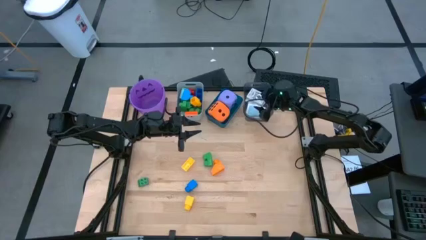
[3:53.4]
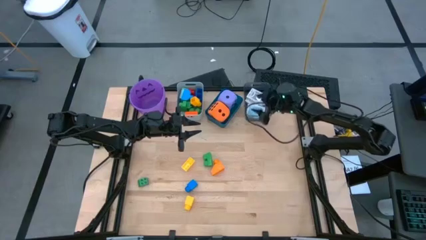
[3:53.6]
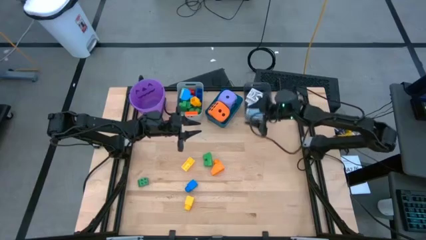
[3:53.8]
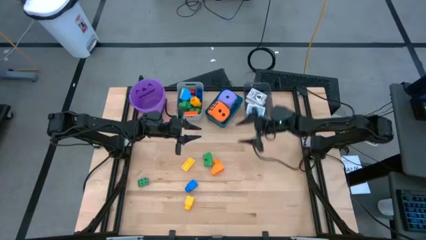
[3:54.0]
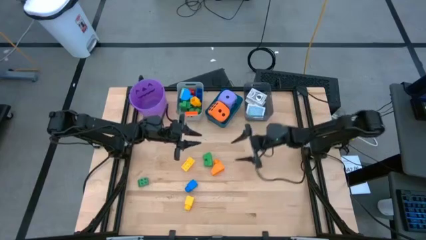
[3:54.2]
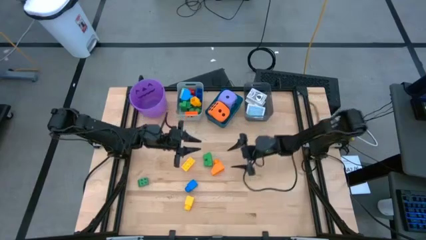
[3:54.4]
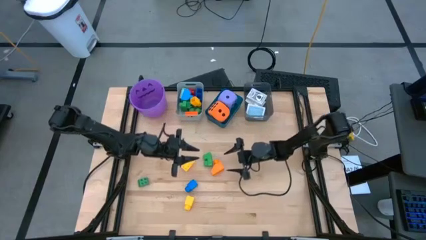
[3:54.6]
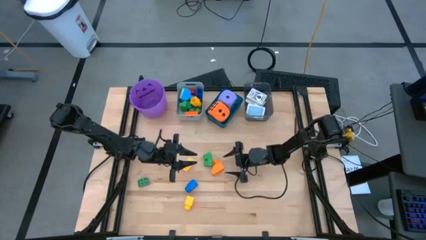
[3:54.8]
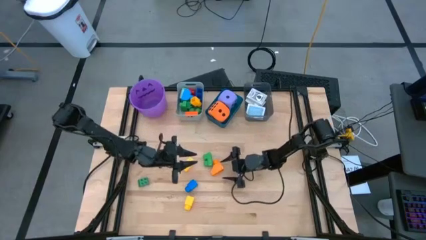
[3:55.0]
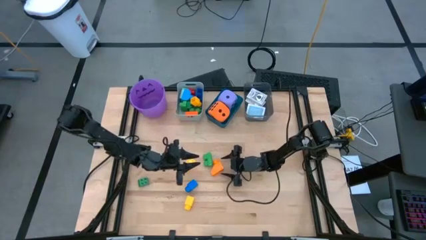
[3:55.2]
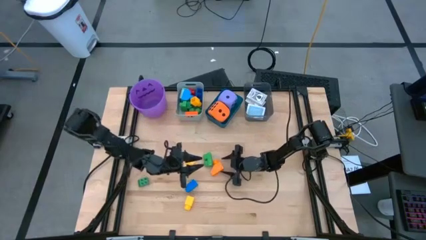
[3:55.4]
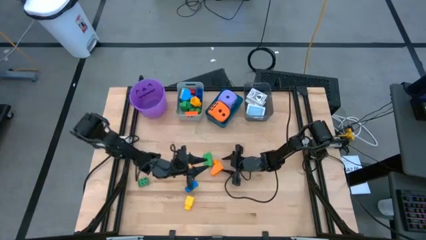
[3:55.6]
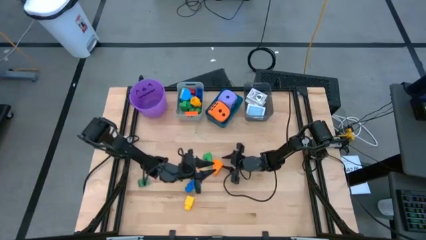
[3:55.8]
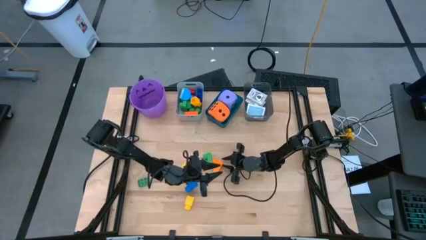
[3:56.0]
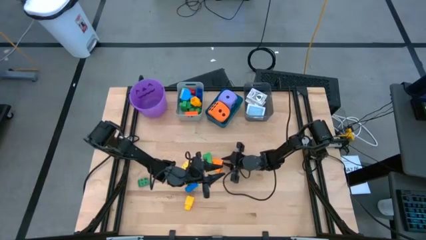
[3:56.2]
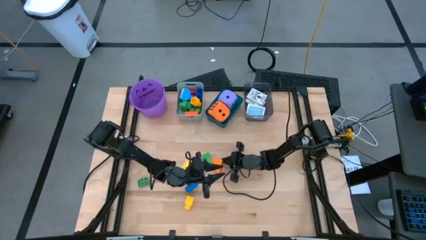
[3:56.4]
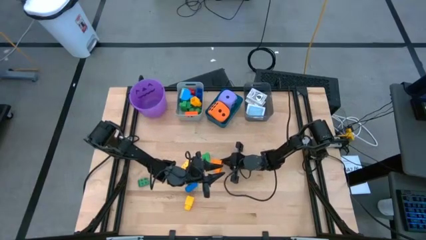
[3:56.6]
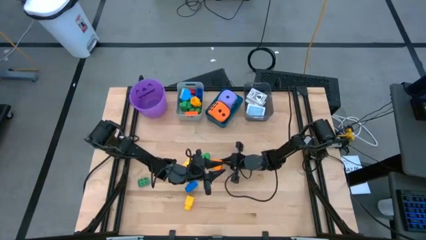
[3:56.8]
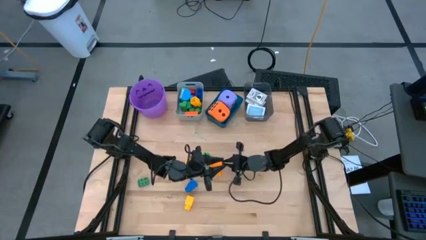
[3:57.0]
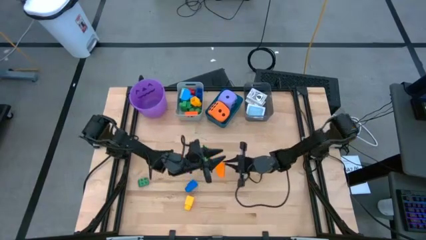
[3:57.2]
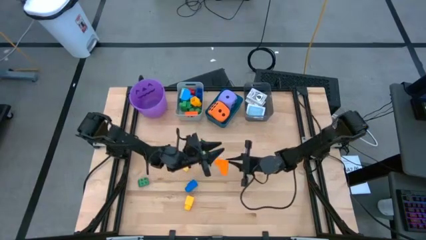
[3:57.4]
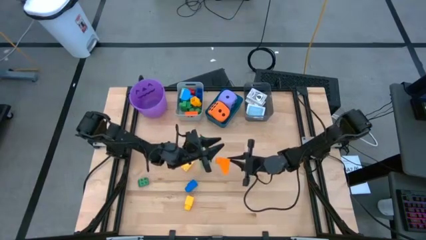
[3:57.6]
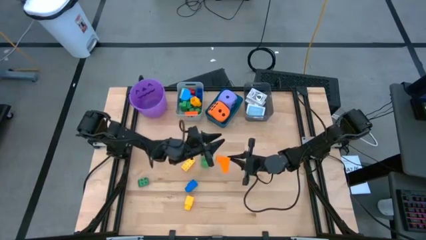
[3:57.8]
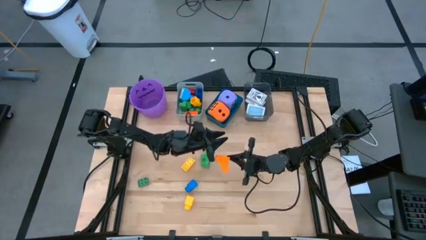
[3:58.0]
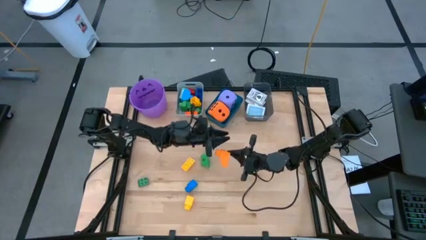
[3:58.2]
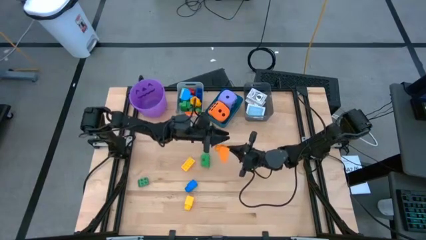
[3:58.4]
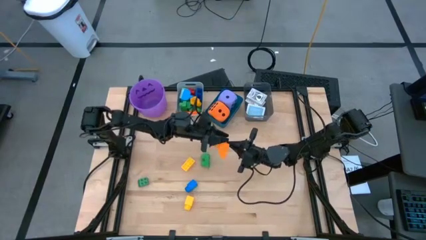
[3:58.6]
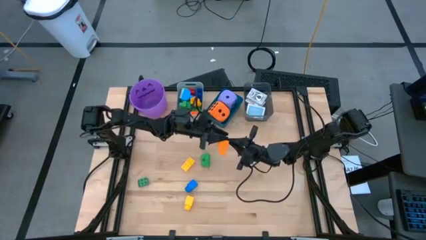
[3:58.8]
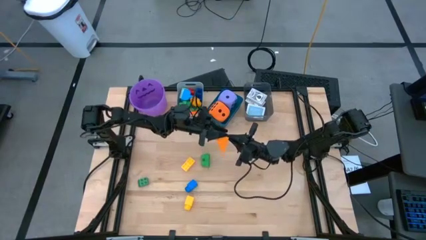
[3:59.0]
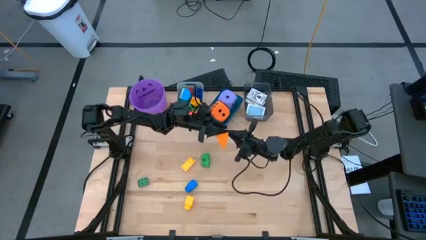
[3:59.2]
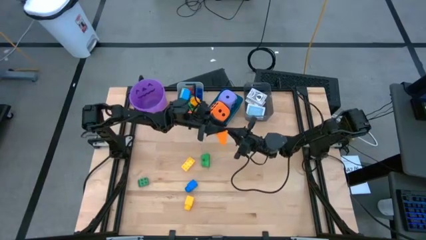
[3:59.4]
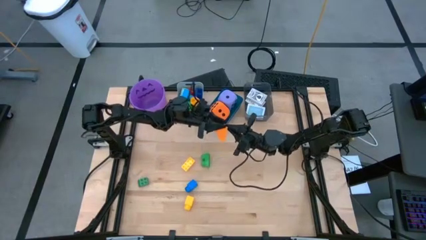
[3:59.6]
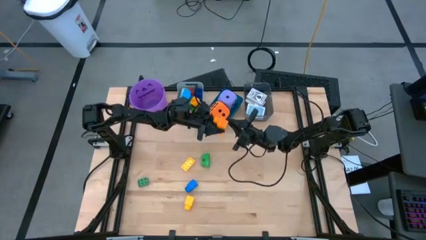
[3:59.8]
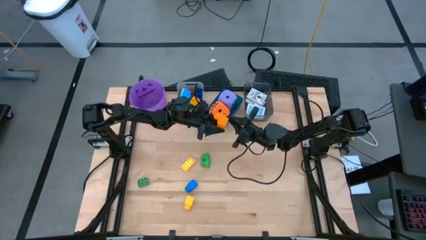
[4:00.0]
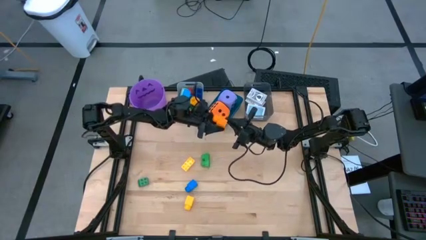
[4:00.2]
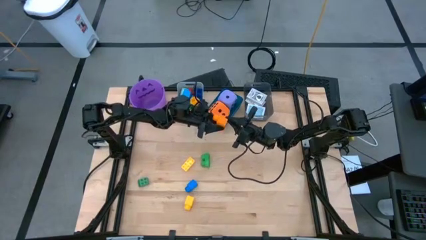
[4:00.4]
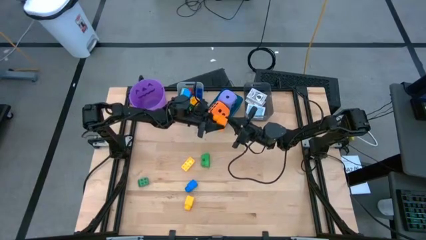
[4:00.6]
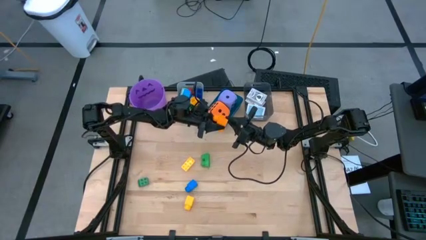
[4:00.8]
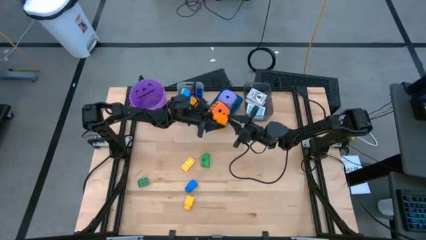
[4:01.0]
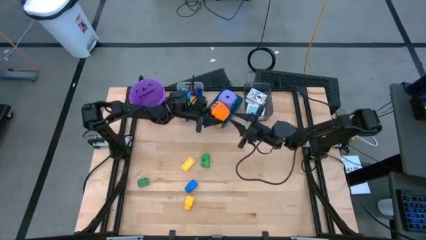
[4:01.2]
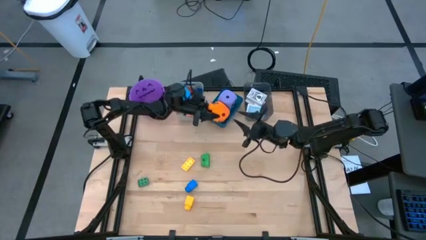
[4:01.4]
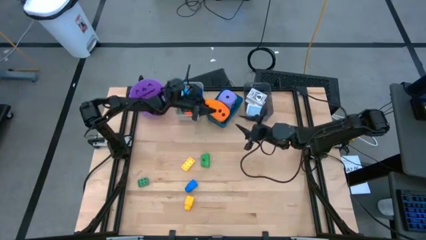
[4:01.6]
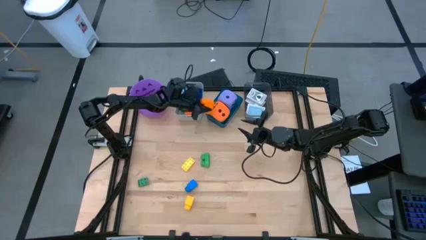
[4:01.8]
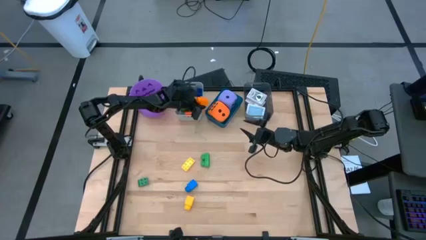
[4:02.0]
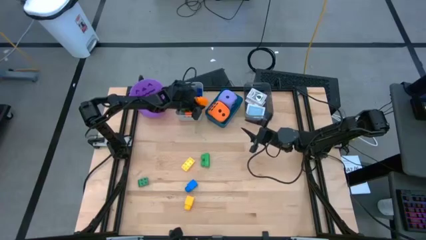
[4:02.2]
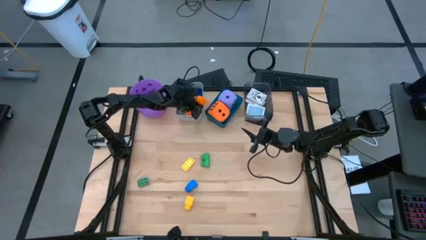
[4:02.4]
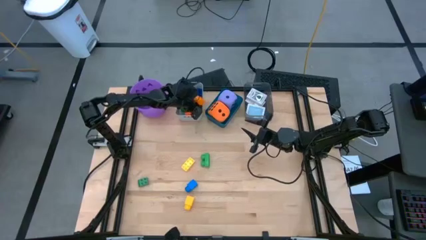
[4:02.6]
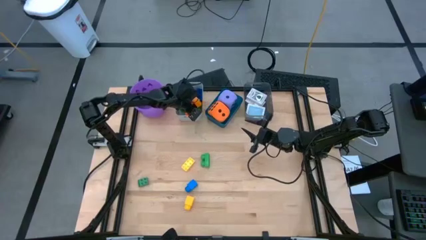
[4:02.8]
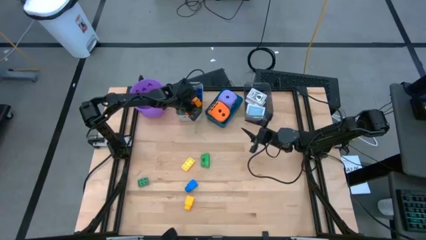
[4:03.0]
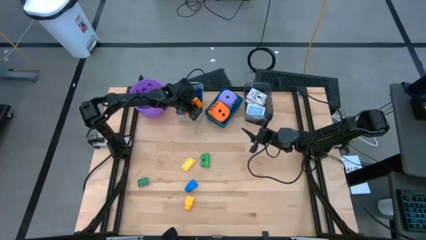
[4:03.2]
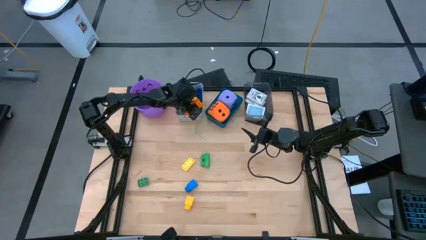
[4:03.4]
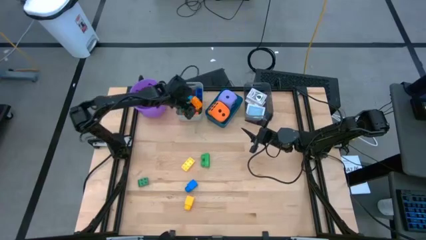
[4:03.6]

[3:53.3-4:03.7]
Task: Pick & Place Toys
Put the orange game piece into the gray bin

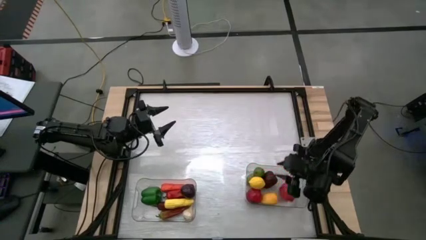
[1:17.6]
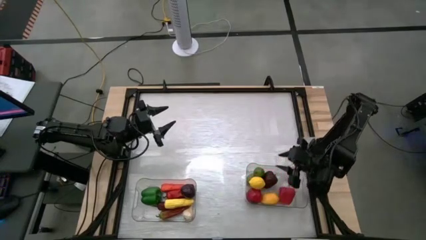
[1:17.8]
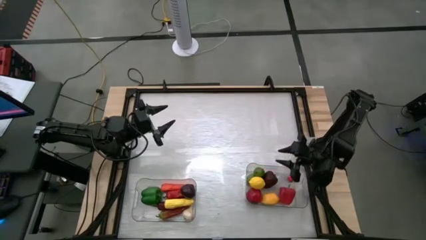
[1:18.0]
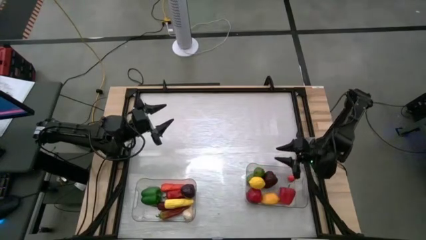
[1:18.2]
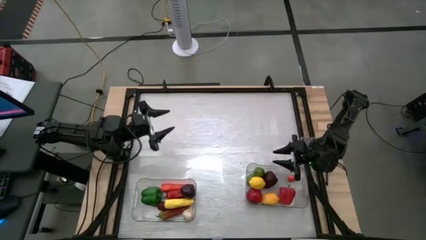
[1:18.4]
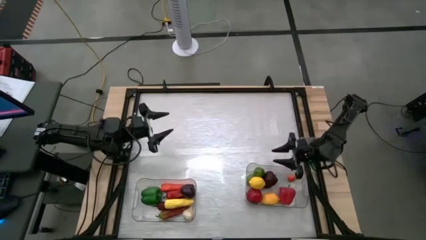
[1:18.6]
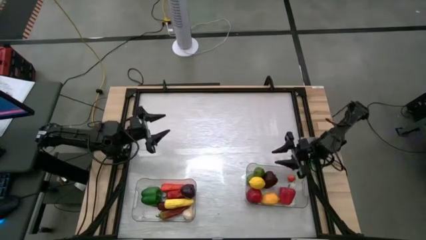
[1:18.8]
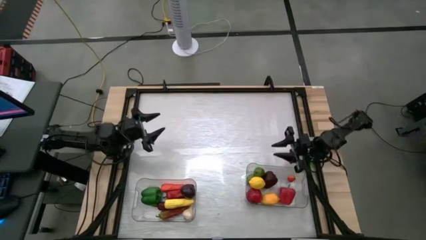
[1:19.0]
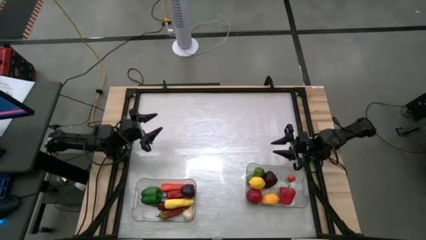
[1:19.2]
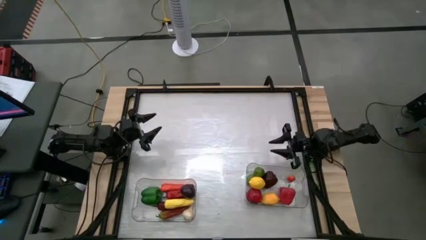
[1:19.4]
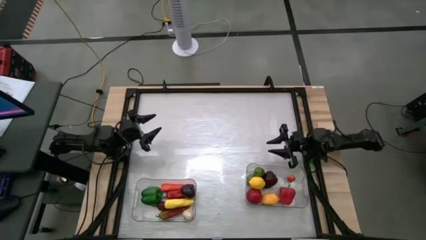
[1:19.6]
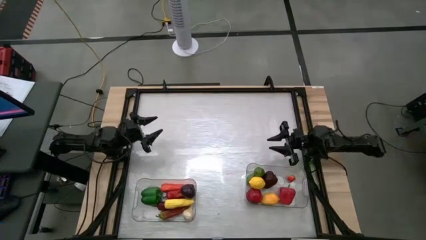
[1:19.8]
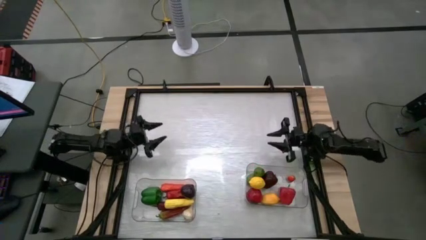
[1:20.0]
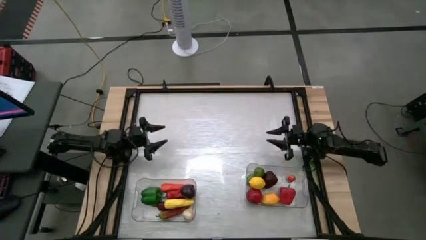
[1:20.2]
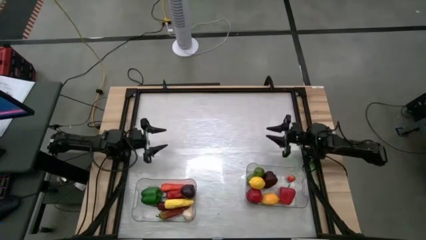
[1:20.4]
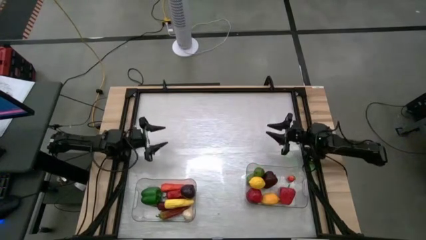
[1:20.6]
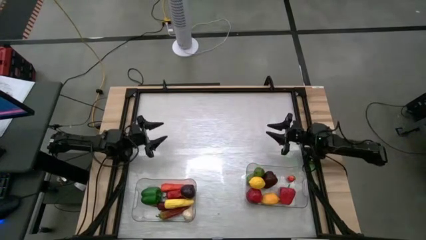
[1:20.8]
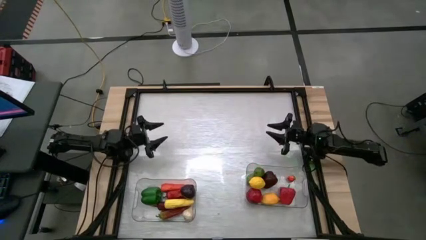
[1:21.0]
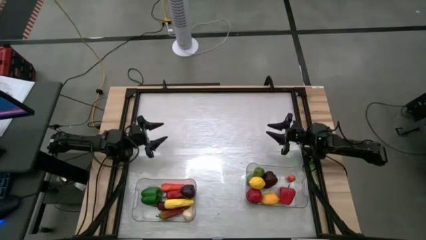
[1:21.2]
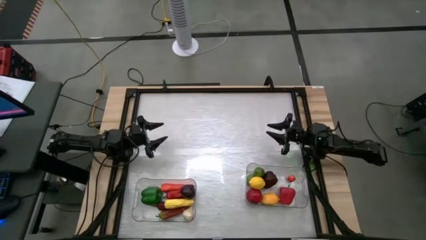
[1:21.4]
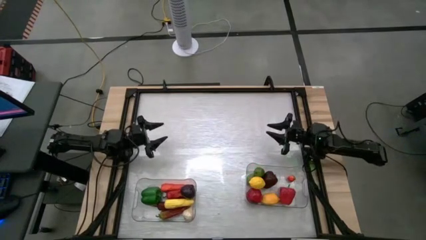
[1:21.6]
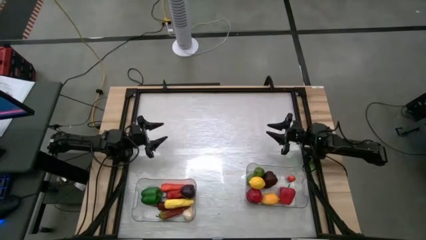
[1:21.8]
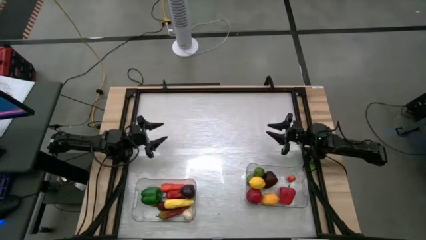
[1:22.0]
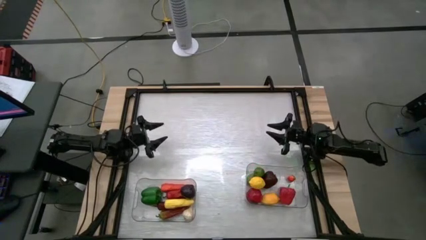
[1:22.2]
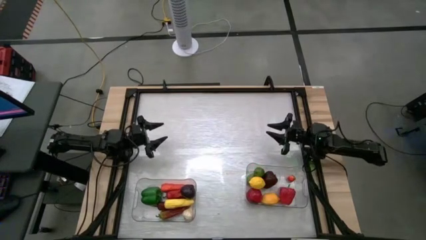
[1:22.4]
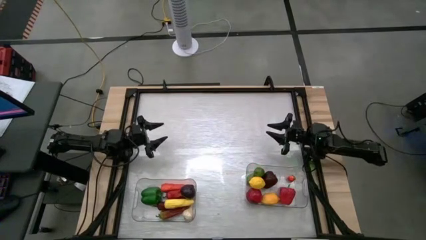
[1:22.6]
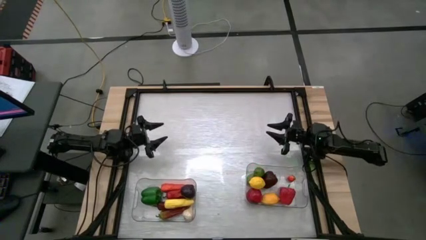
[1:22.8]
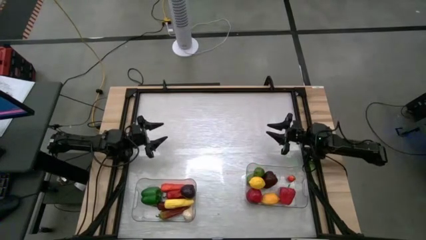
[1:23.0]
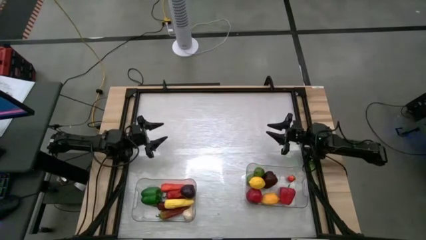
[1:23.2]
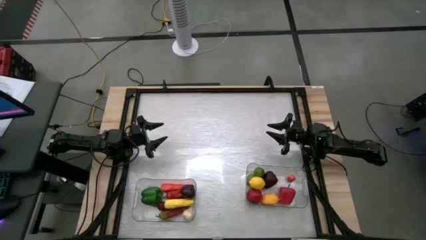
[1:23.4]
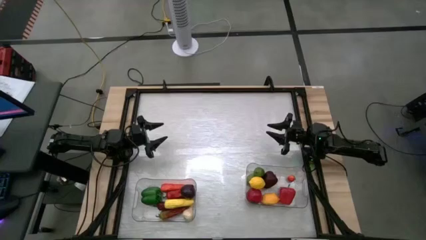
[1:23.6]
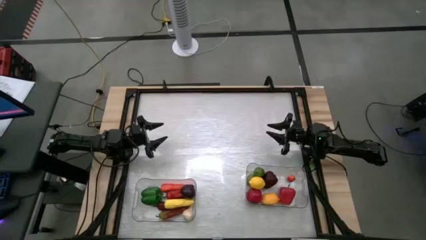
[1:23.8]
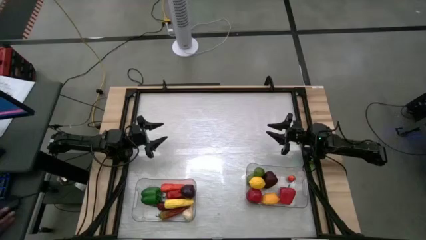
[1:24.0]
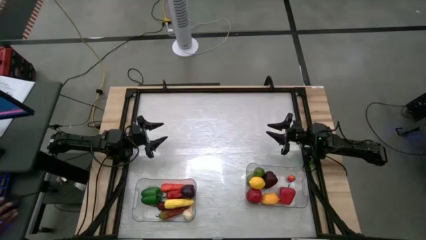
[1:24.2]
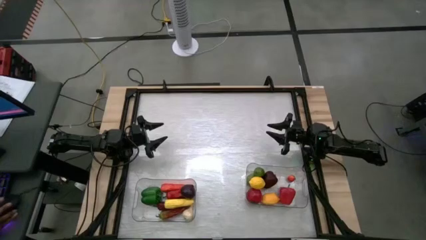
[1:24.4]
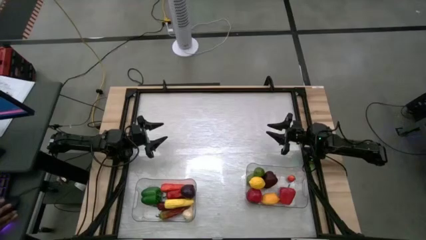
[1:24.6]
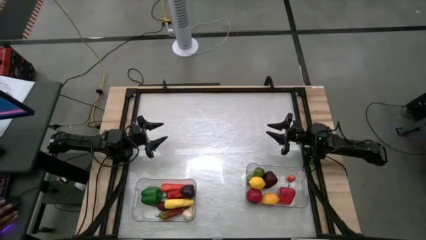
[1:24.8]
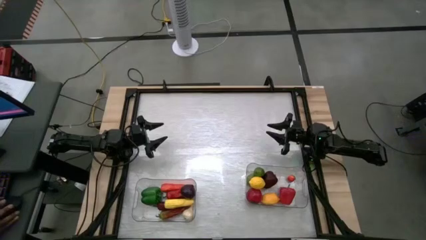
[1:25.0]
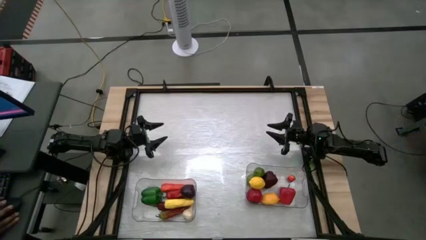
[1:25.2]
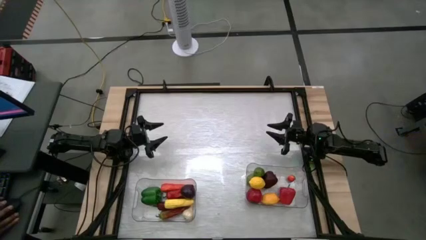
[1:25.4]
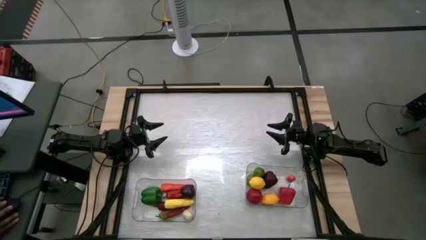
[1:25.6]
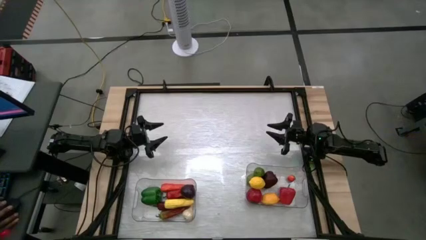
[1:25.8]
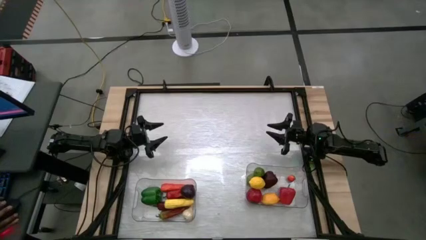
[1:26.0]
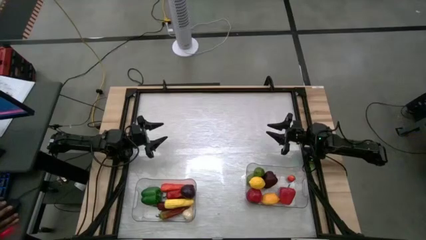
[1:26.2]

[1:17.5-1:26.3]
Task: Sort produce into baskets
Return to Home Position
